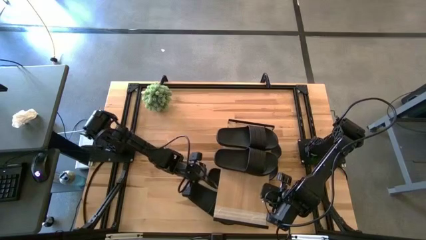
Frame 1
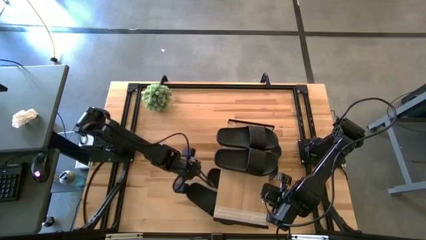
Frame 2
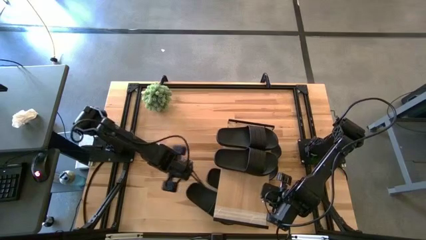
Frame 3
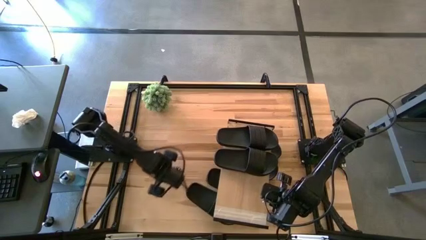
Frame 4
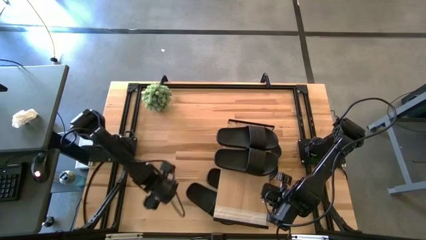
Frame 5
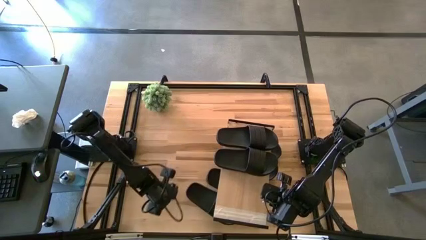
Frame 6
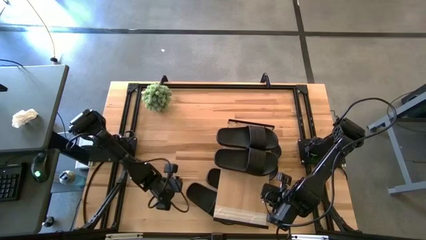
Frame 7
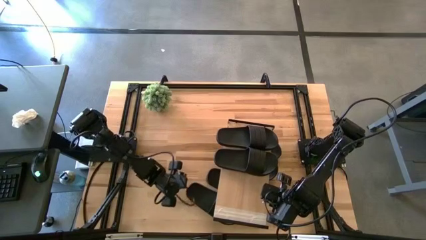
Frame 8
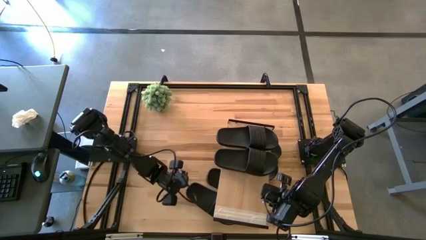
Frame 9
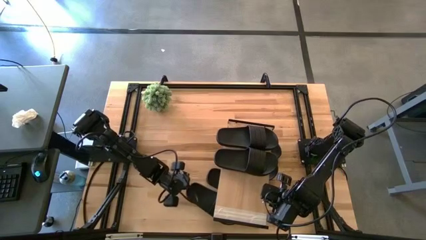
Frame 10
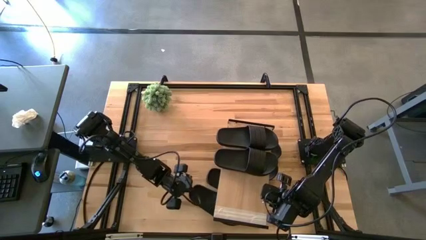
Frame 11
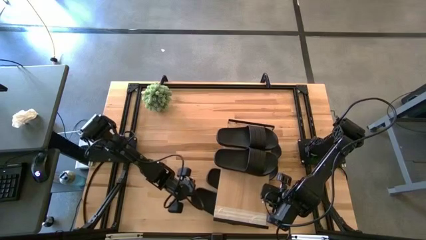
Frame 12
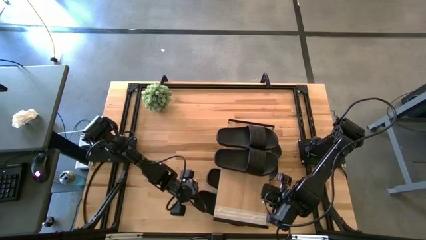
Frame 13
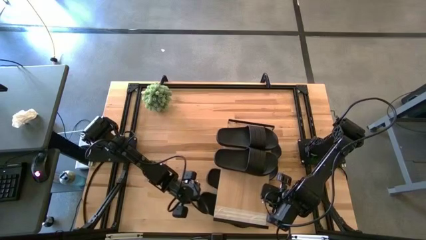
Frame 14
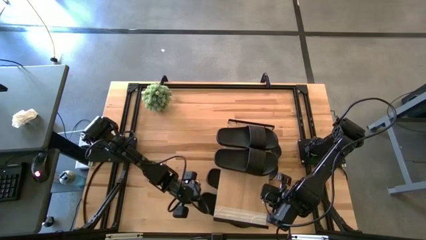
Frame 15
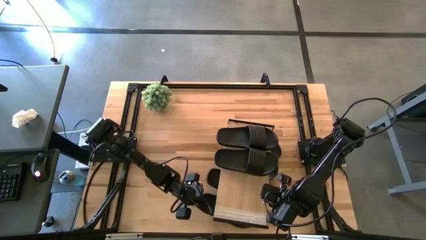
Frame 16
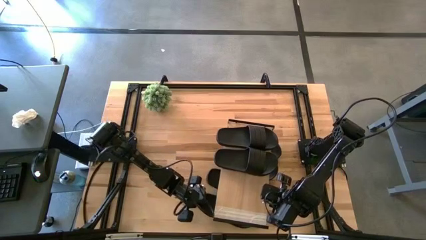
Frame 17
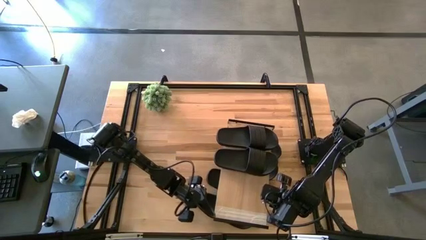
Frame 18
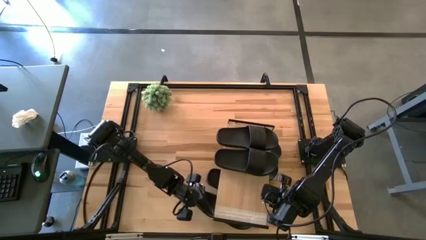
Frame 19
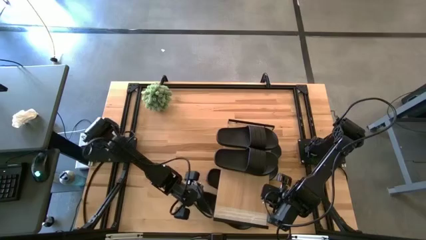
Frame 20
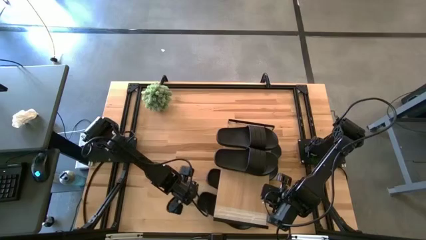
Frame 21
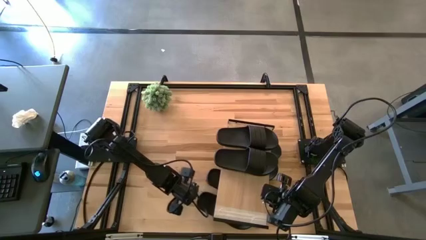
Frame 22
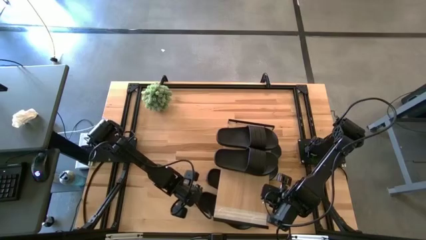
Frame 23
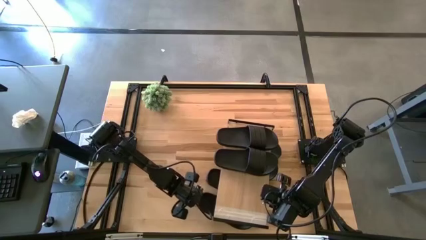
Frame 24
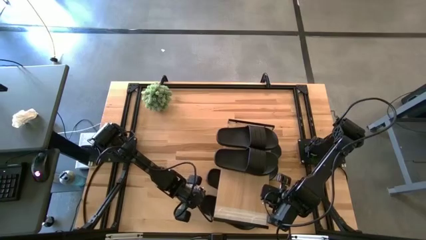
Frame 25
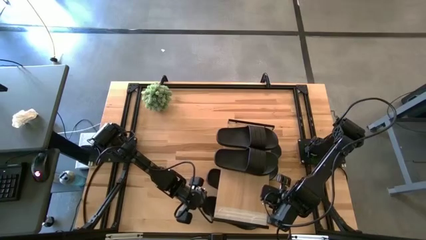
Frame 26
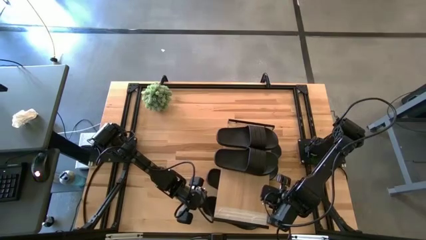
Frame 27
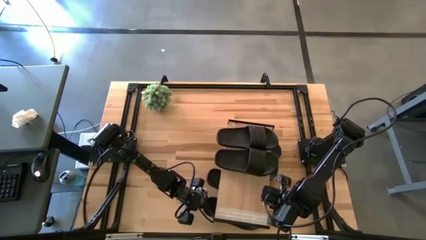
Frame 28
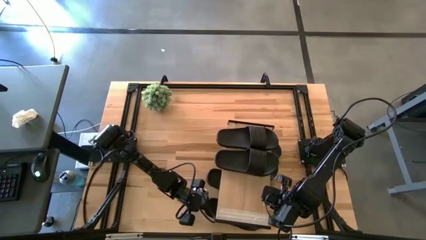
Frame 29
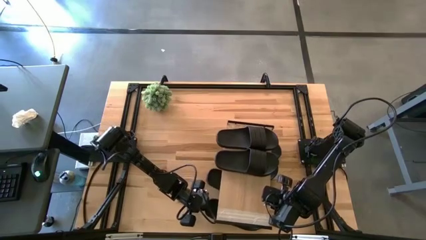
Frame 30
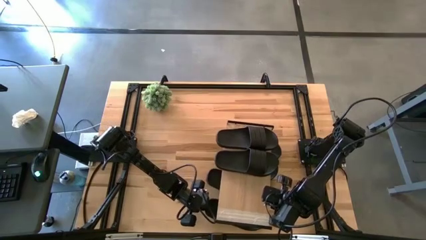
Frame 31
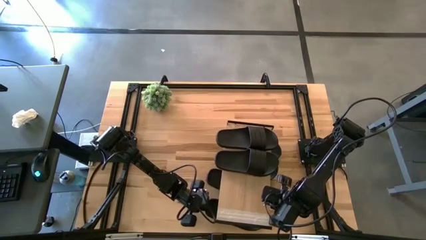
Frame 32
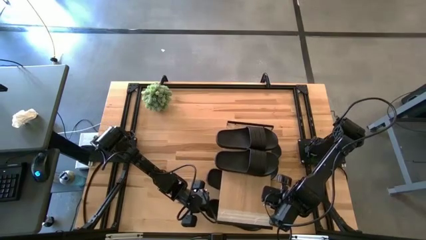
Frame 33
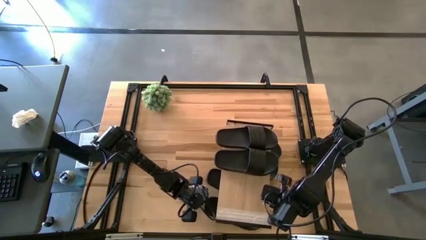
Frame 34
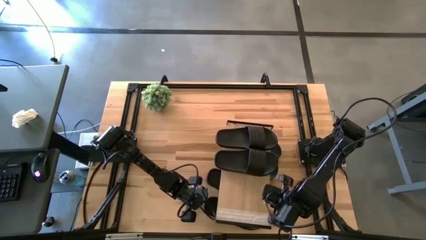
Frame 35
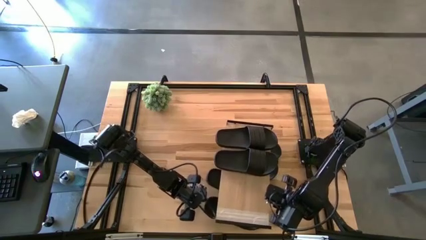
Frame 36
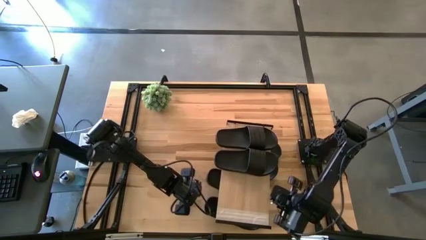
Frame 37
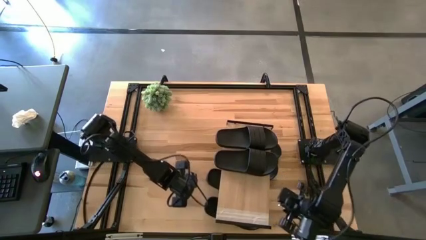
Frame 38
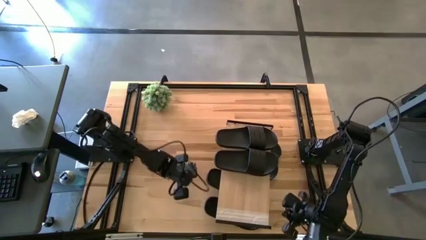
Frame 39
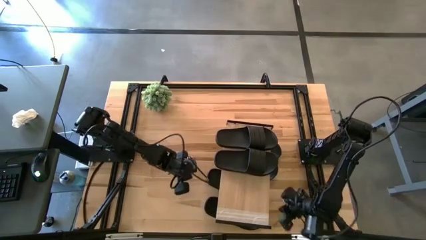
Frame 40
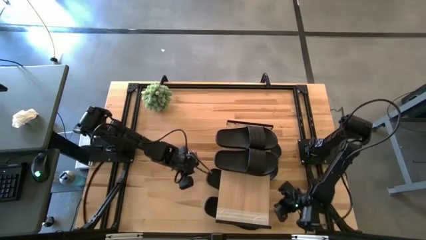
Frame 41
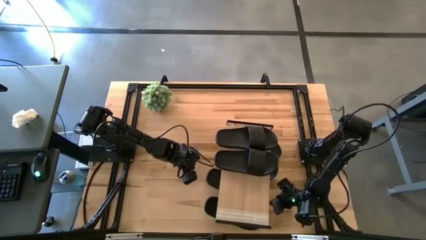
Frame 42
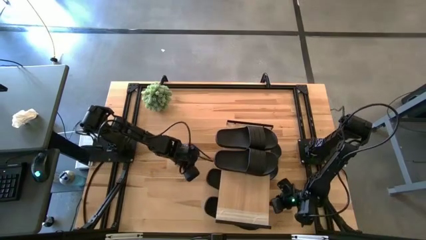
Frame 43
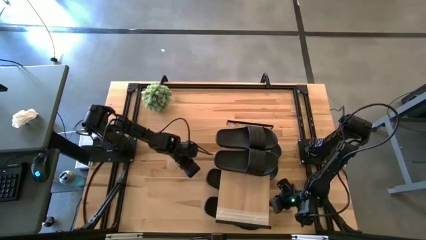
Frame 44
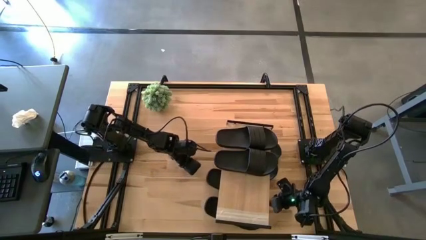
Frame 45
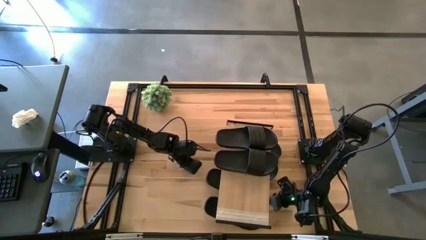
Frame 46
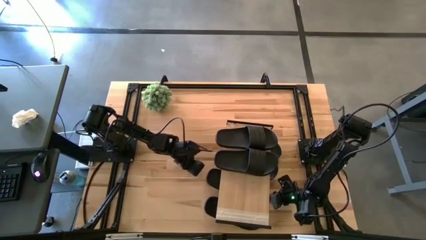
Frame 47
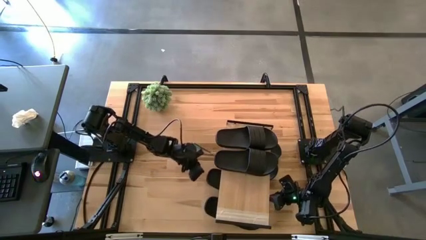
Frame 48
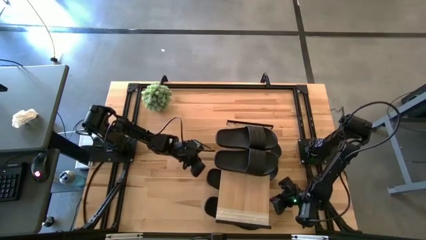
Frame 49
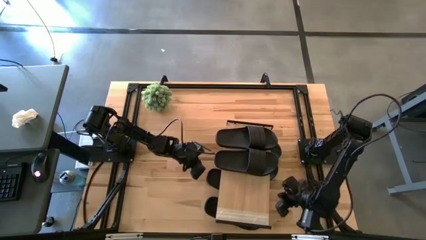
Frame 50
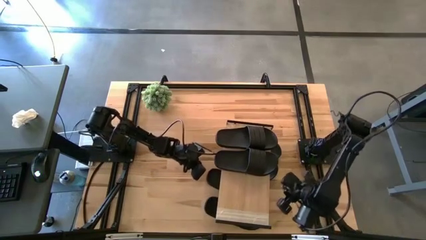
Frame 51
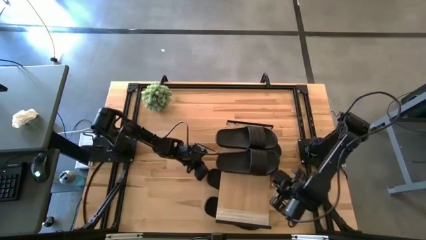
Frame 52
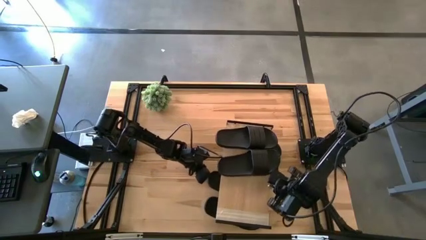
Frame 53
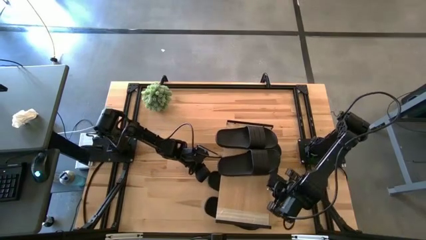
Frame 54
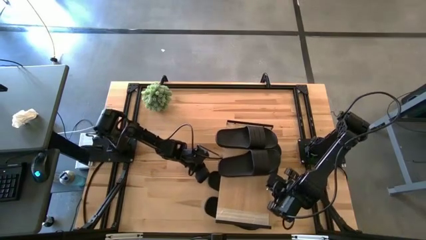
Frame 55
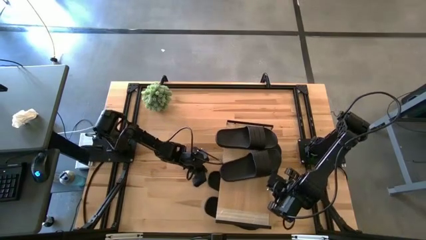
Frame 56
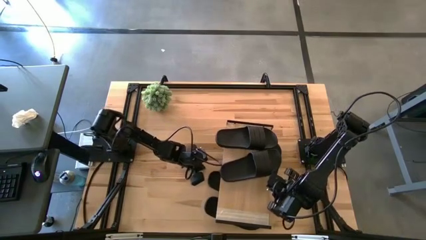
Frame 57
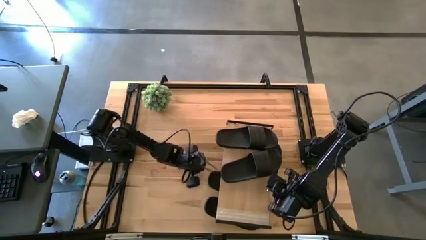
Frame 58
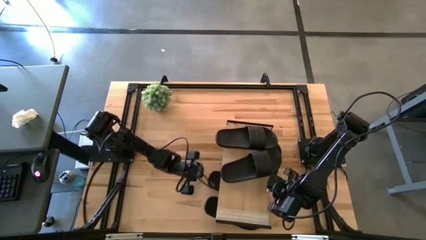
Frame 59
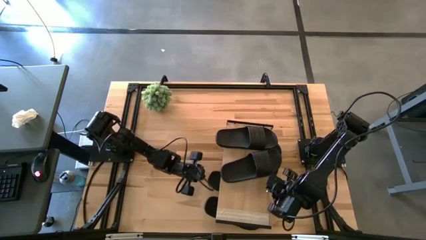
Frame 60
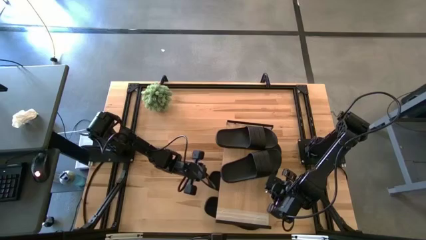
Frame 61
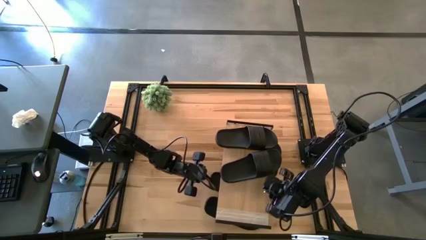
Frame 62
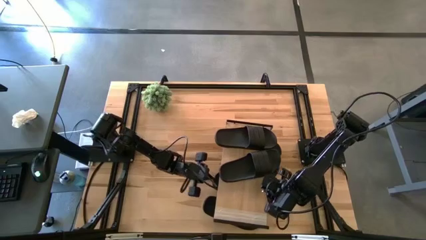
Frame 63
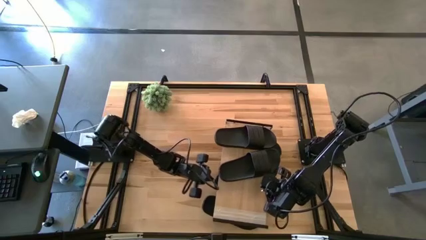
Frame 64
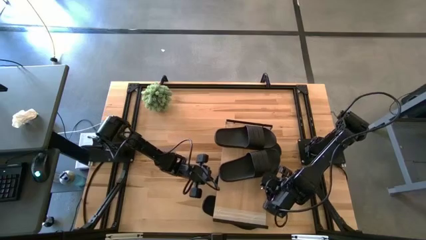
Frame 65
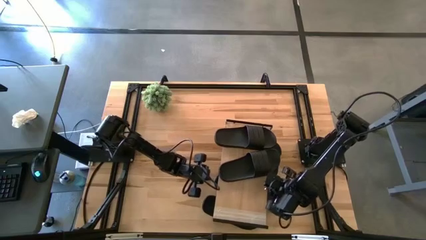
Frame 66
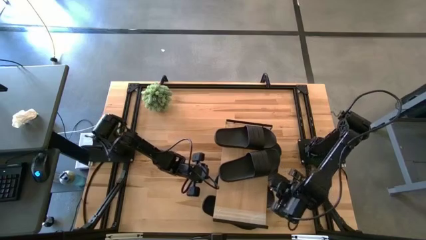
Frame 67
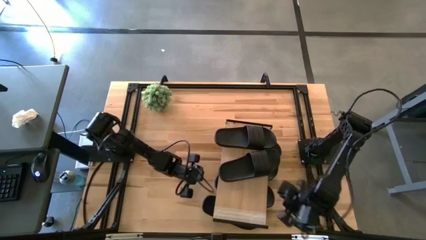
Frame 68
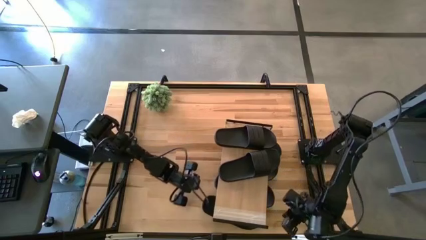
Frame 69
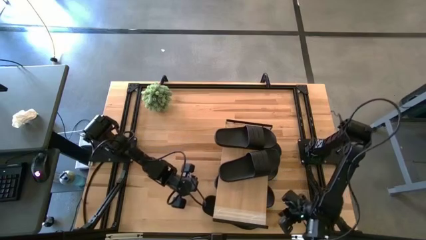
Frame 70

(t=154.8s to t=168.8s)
Task: Pick and place slides into the shelf
Adjust the black slides under the shelf

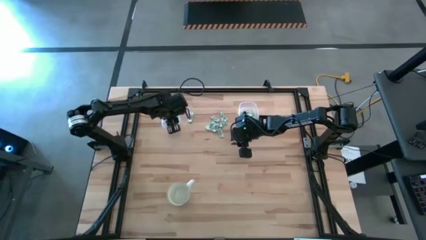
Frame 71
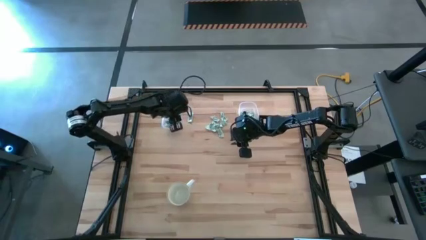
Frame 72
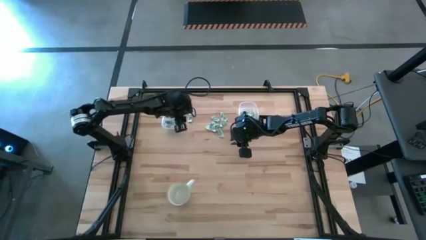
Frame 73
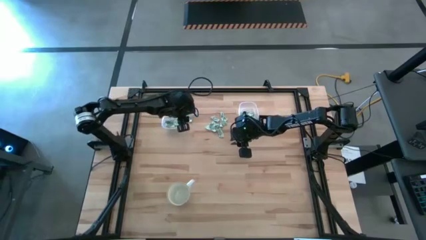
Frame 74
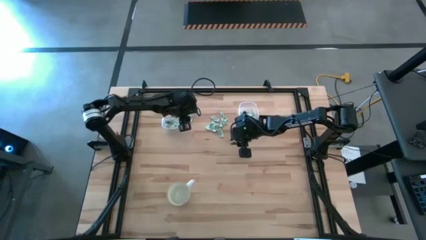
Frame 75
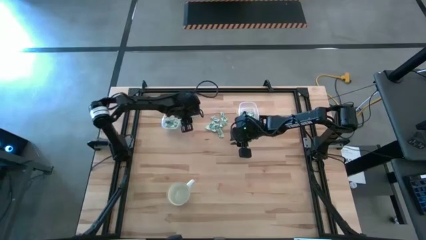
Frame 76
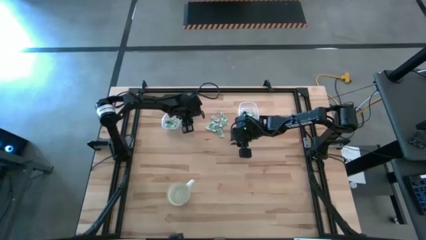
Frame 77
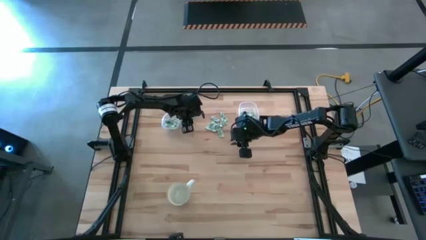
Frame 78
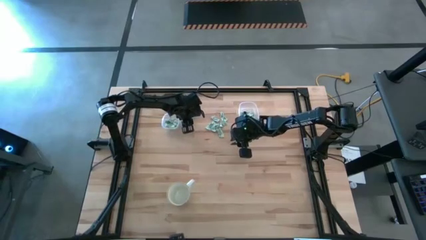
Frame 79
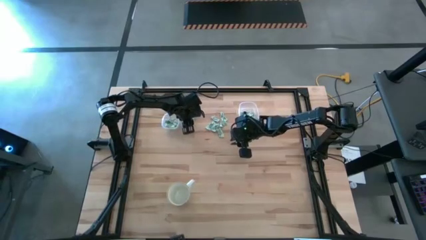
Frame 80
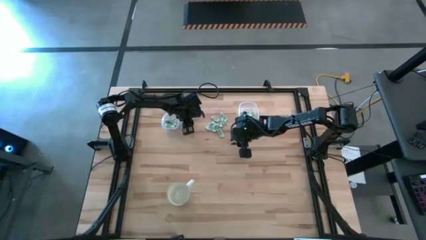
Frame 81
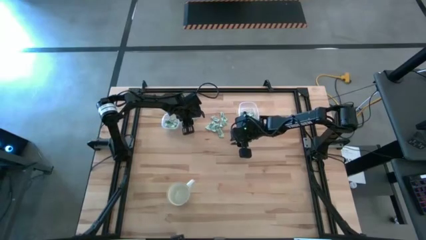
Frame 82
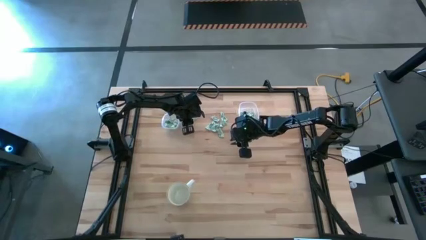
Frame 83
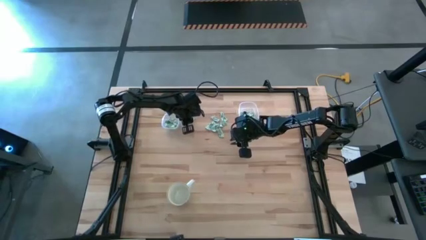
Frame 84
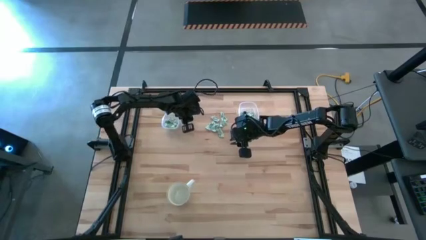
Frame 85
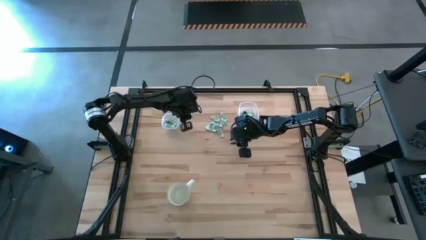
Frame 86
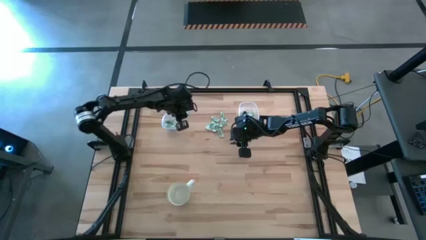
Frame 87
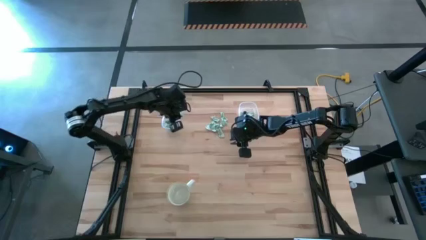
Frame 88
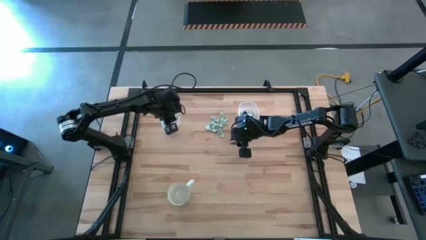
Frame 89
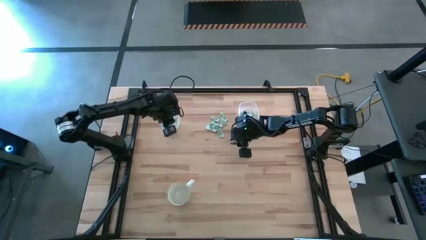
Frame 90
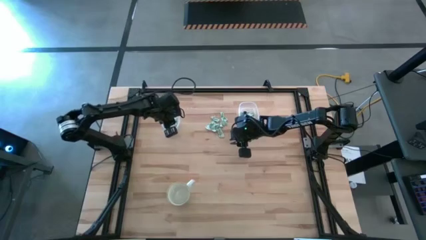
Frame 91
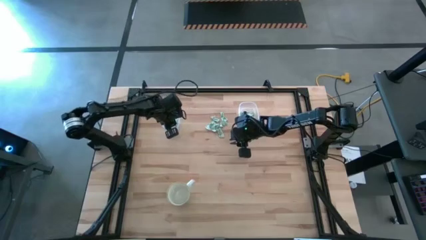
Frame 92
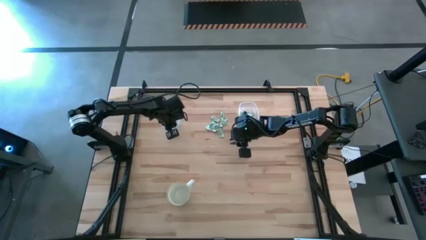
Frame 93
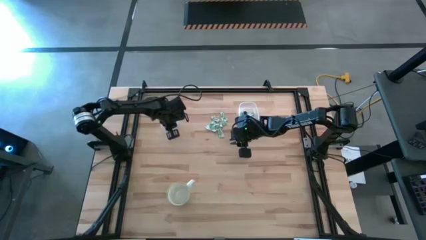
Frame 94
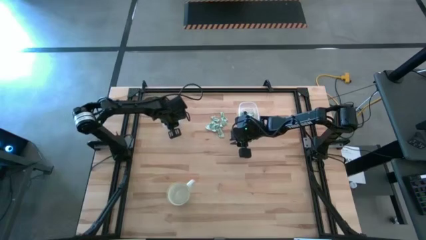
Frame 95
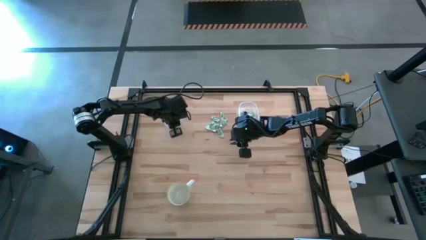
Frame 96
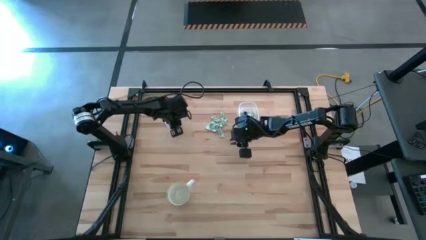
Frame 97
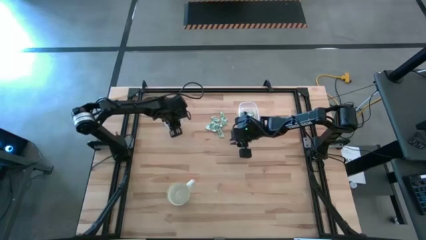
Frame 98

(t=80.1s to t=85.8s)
Task: Pick and place items into bin
Put the green stevia packet into the square transparent bin
